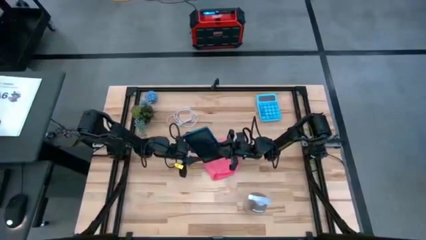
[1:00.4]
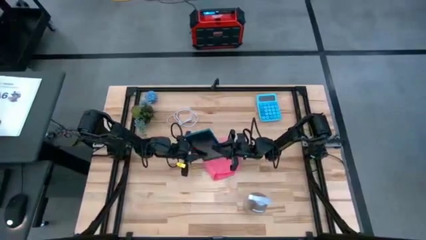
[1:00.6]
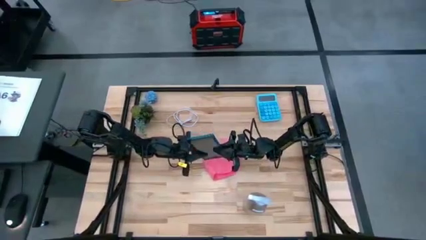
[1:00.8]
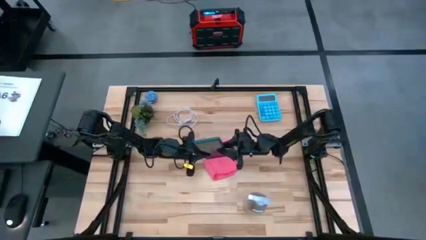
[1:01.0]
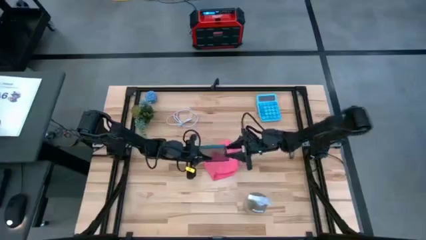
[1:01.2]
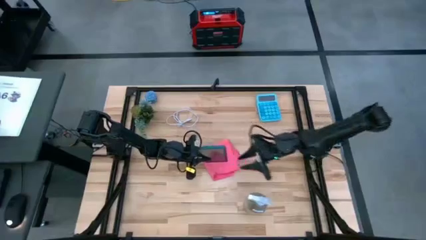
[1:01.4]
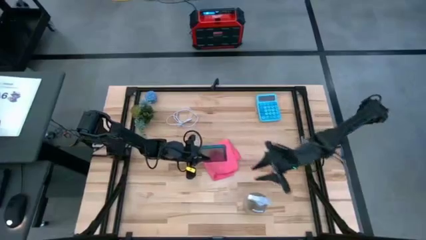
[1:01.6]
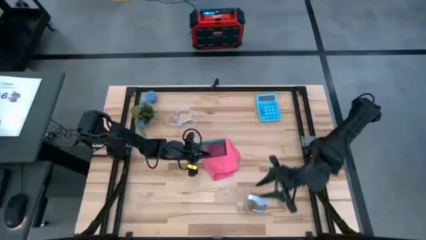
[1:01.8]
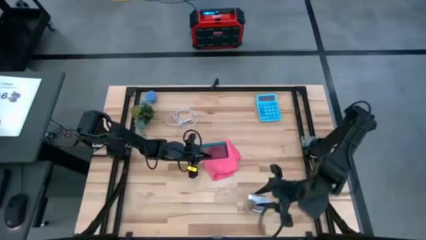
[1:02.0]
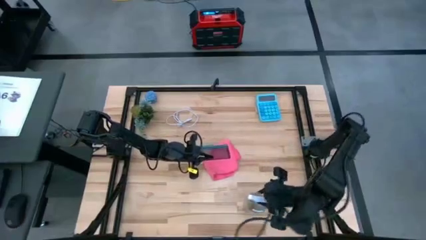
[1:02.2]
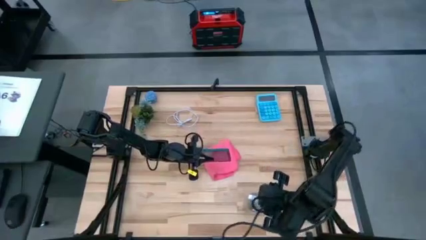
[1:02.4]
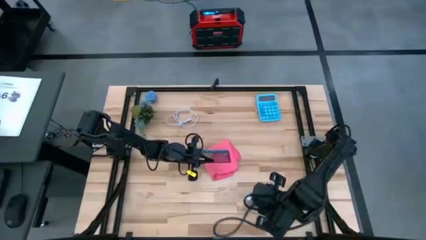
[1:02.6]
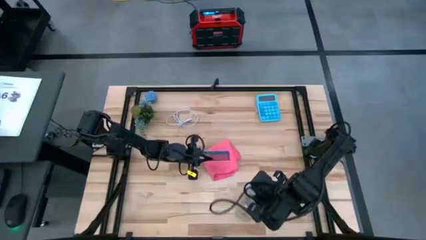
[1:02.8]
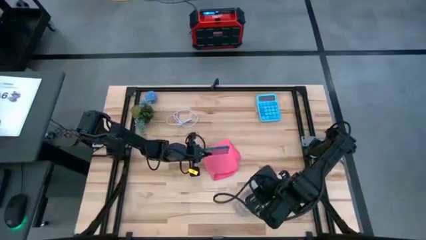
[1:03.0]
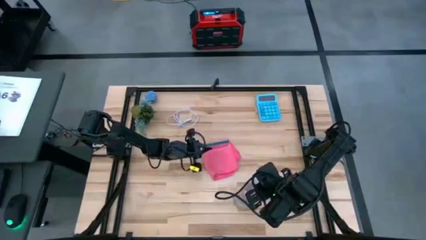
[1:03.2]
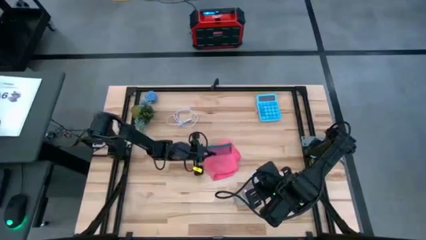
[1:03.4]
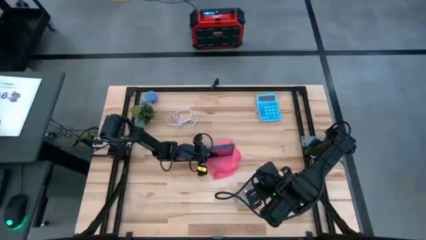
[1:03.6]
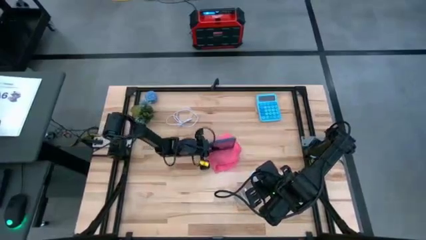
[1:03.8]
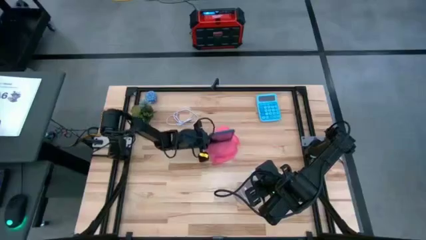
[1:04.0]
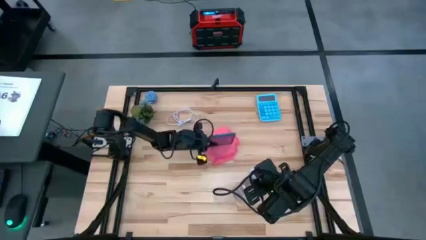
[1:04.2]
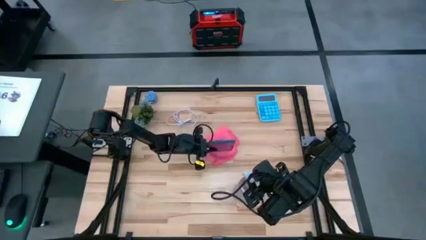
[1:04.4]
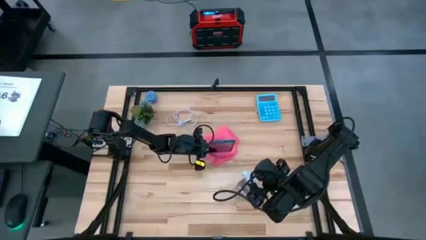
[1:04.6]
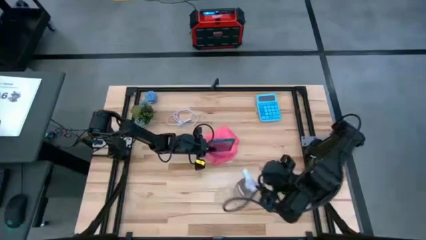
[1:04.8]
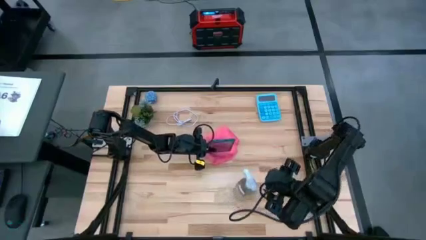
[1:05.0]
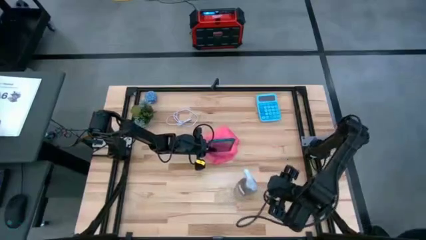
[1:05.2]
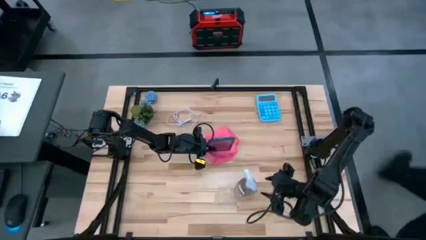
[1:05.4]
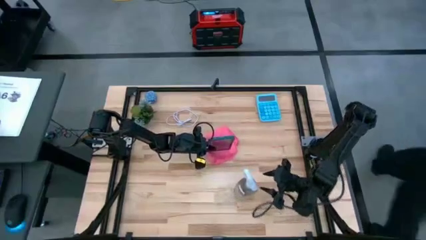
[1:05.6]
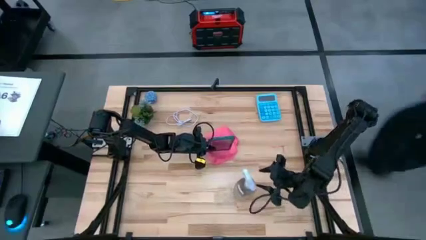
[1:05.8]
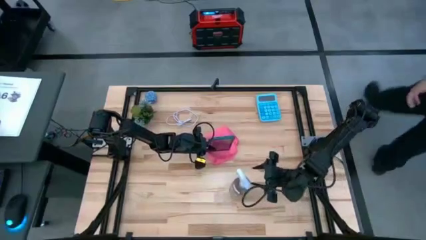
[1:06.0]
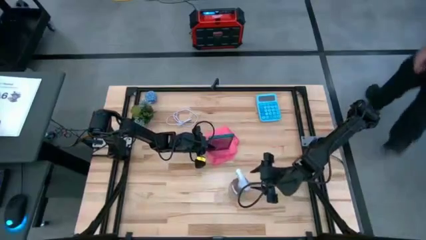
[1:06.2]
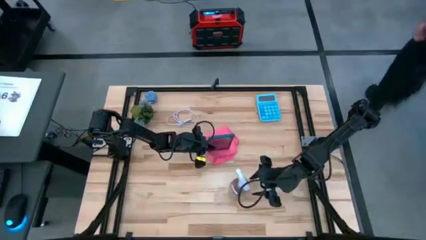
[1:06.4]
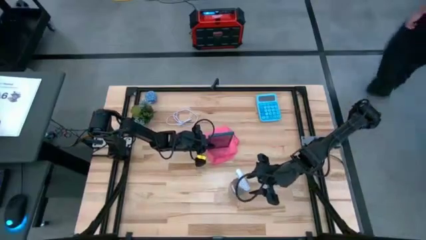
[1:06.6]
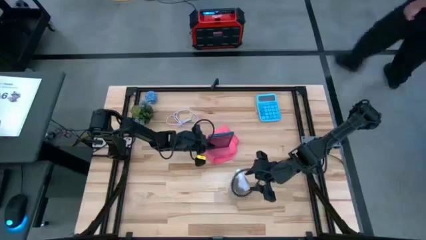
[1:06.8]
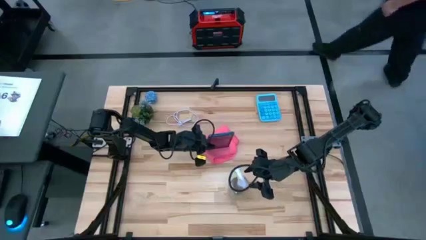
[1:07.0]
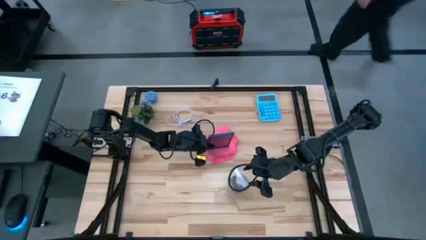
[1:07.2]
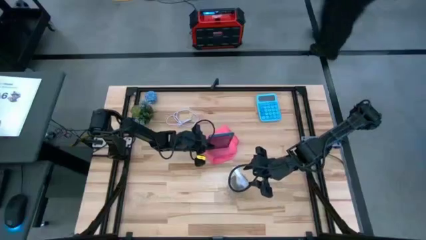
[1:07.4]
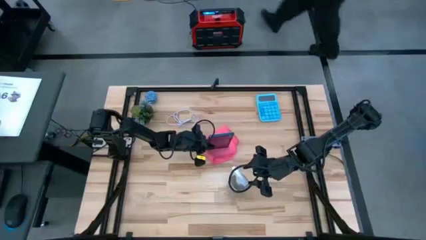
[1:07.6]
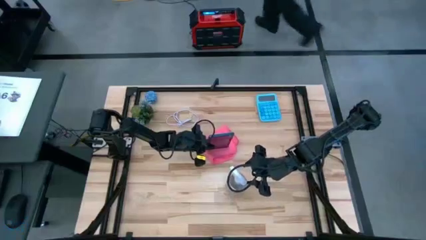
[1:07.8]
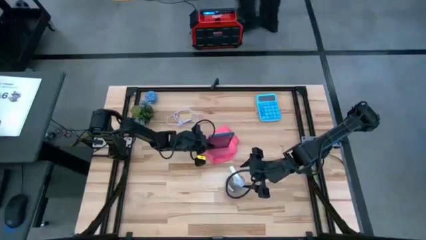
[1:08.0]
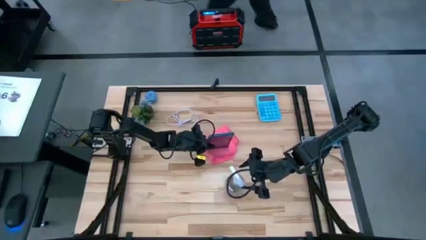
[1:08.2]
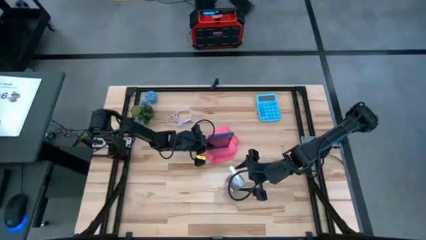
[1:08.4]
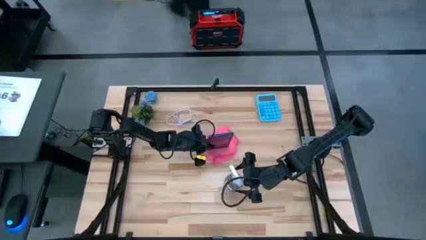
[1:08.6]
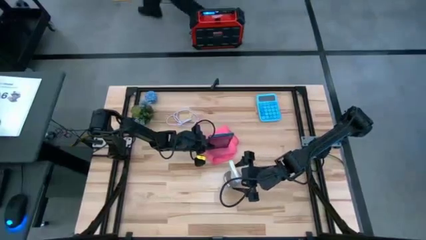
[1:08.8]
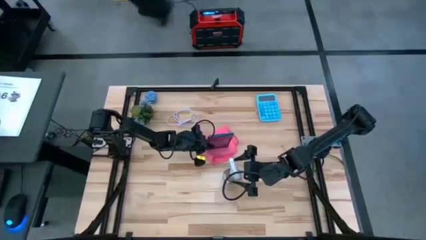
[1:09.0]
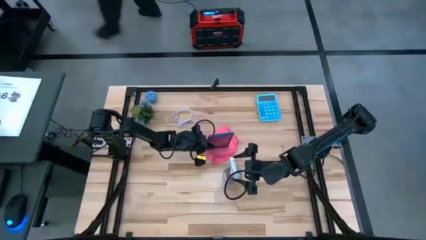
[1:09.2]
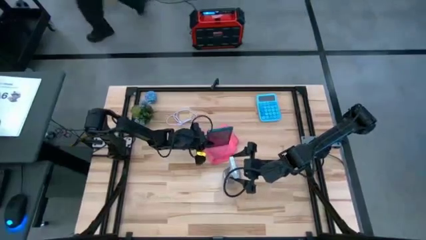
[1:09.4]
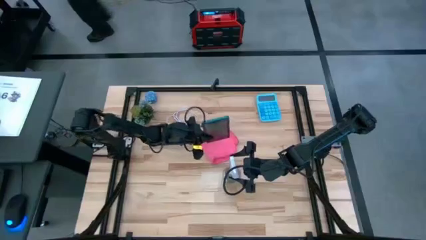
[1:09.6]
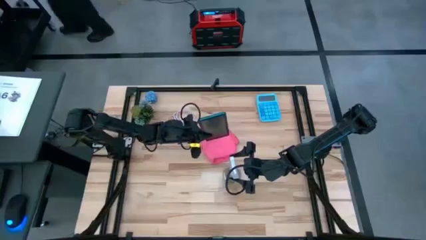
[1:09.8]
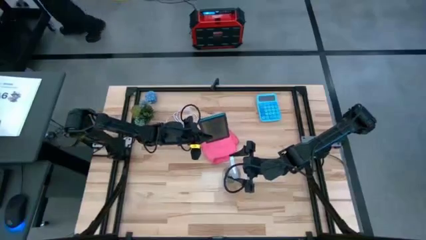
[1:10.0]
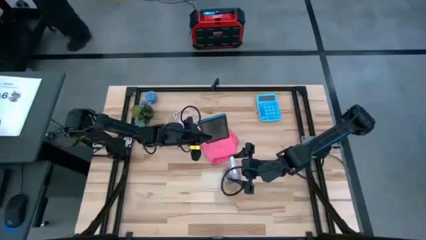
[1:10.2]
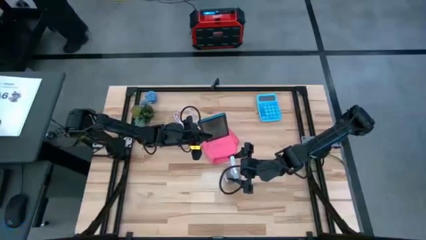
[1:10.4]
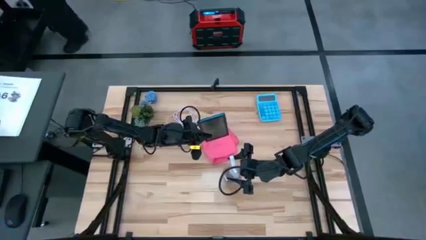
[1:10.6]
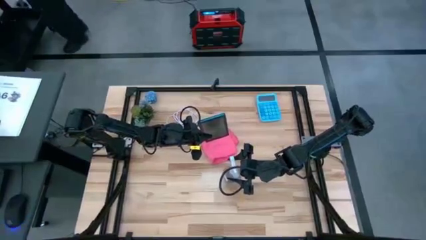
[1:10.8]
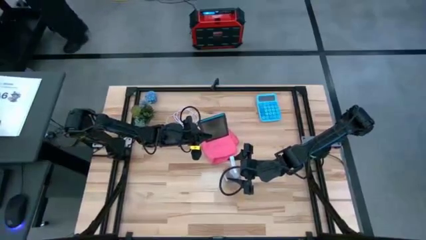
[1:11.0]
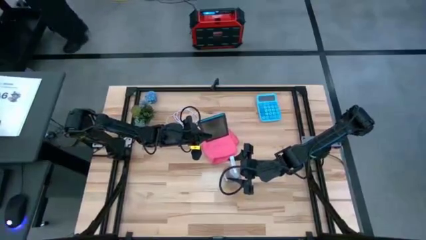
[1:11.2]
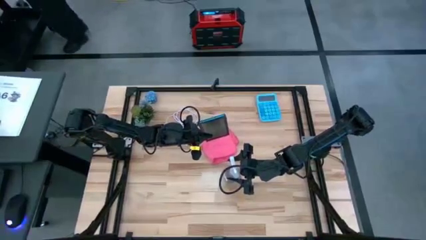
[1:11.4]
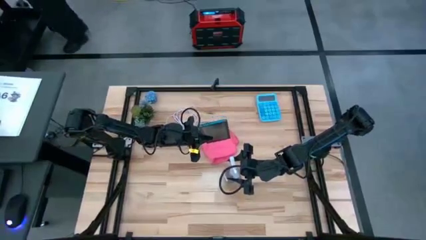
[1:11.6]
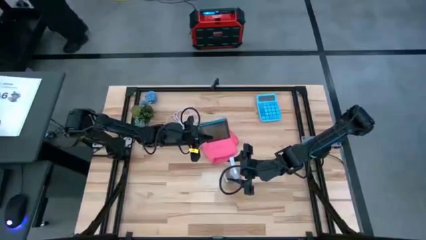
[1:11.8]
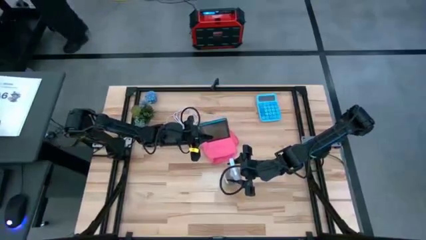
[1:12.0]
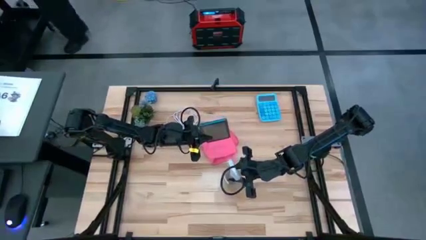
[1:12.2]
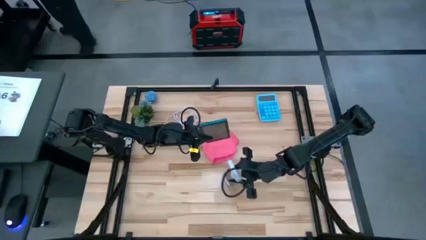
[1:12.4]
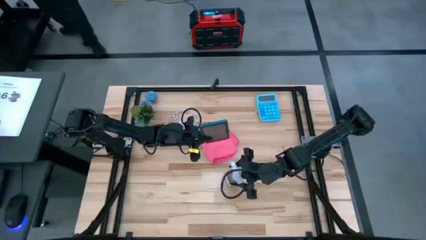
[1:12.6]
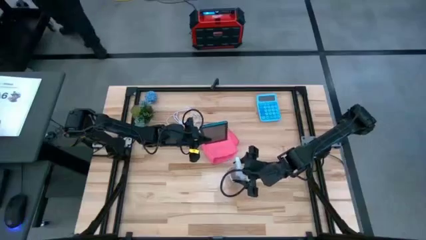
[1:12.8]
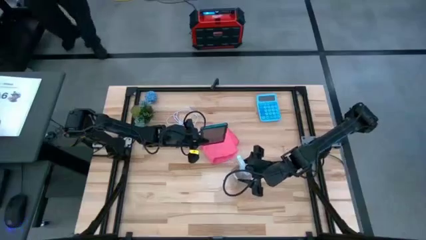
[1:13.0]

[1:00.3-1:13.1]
Task: Apply microfiber cloth
Spray the front of the cellphone using the spray bottle
